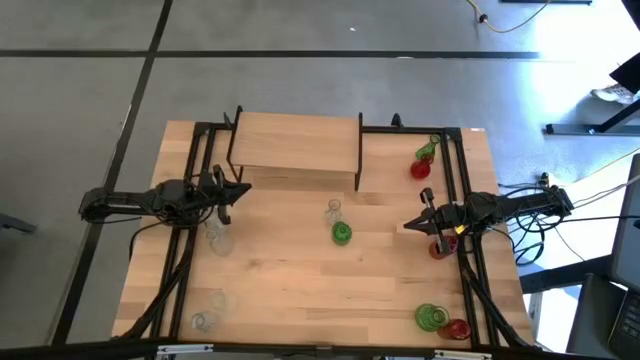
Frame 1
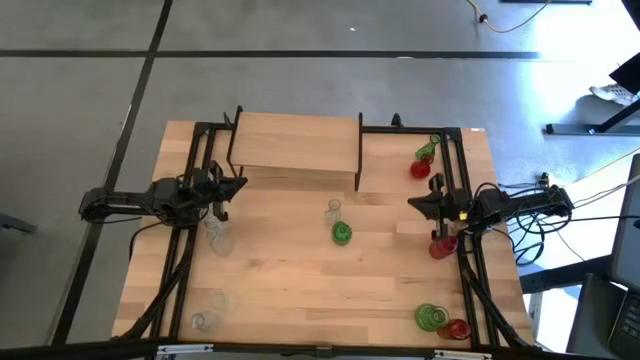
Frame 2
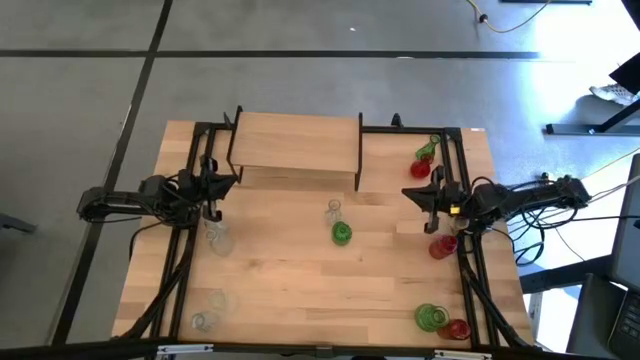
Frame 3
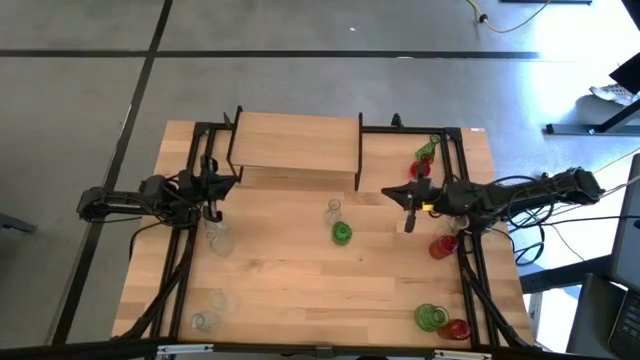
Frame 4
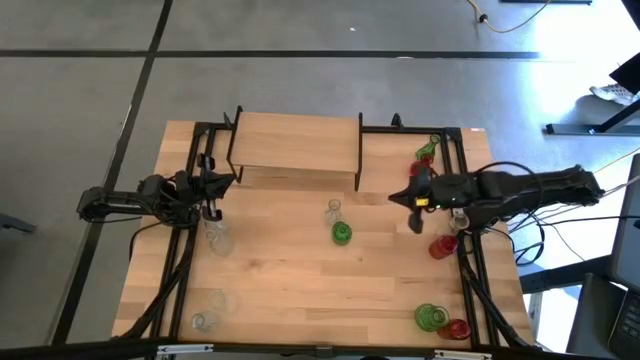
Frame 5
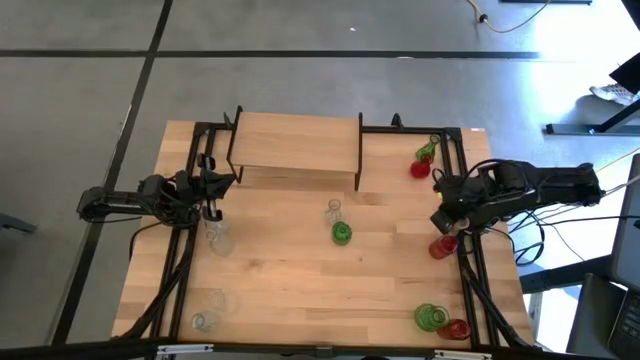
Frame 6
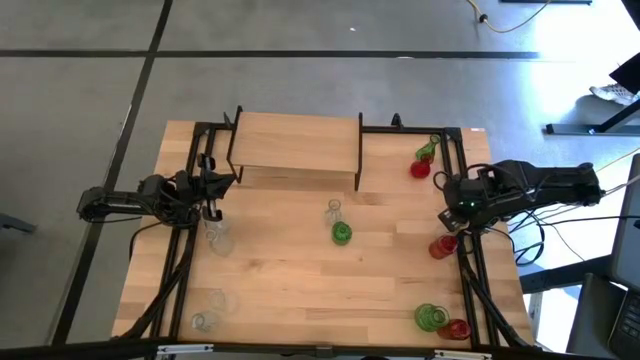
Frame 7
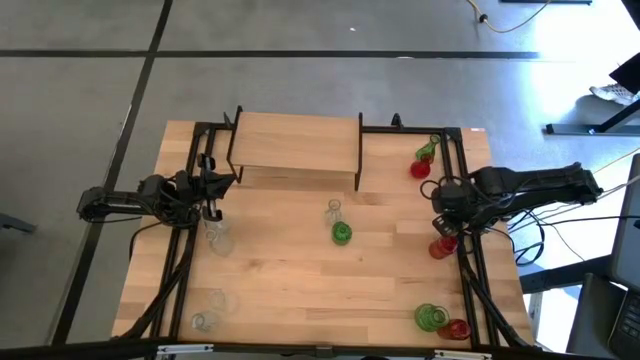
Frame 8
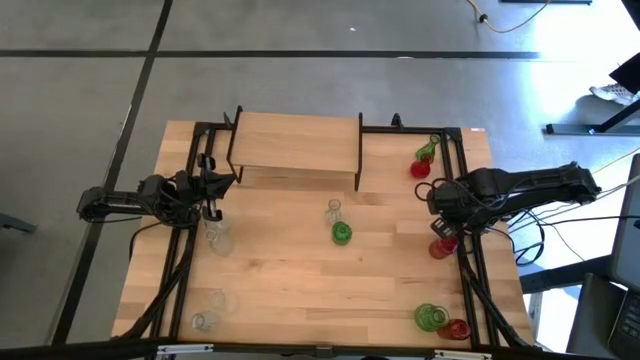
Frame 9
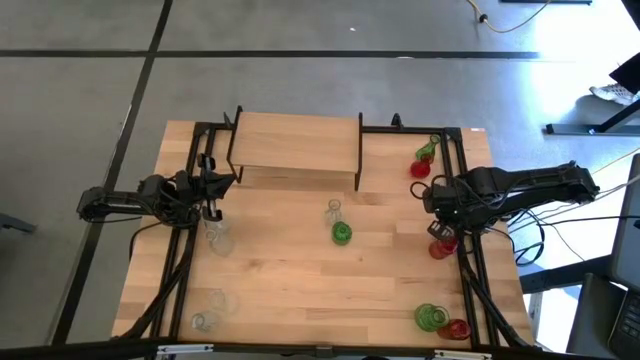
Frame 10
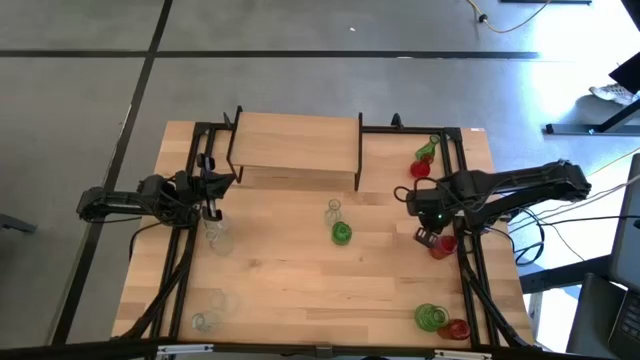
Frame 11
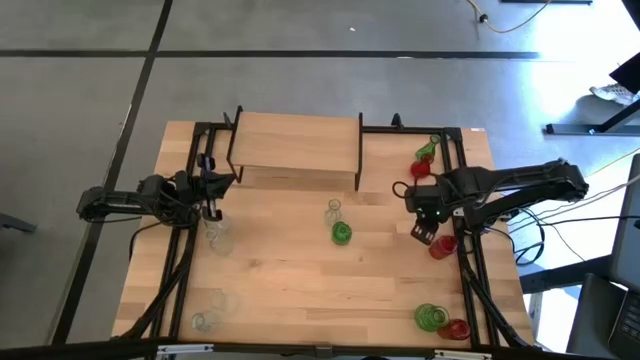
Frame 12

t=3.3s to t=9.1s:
Task: sort vases onto shelf
Adjust the transparent vase

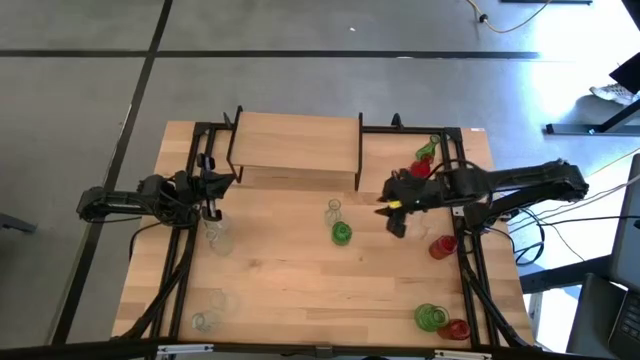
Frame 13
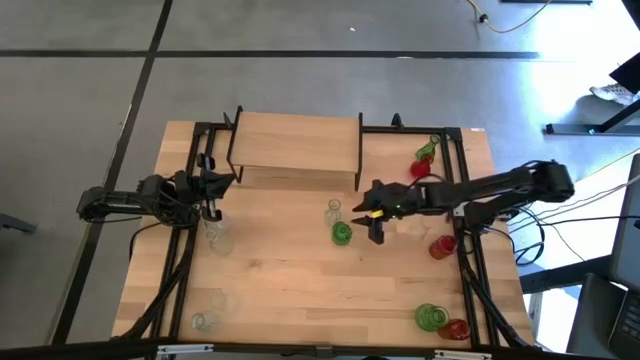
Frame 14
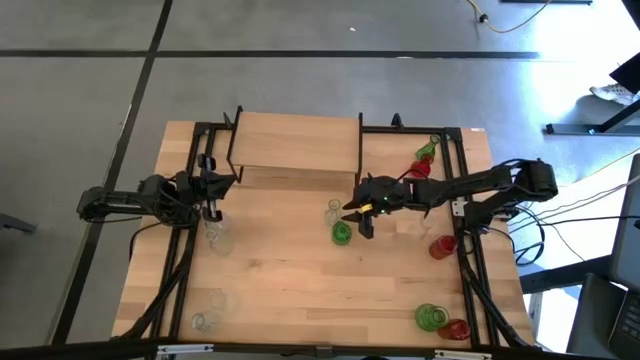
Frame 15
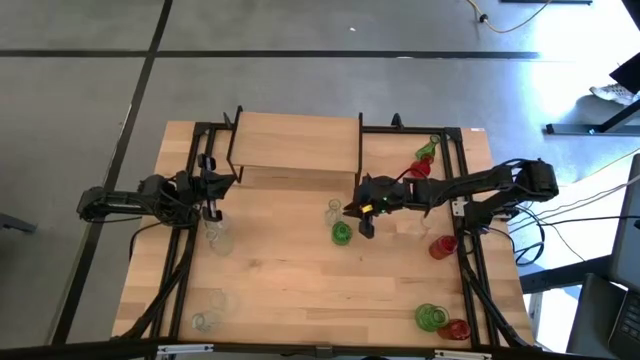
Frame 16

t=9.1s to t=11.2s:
Put the transparent vase on the shelf

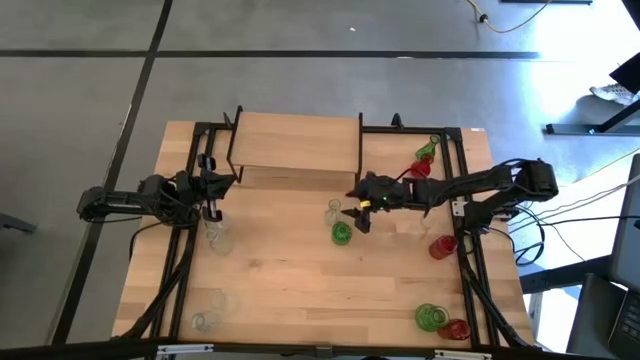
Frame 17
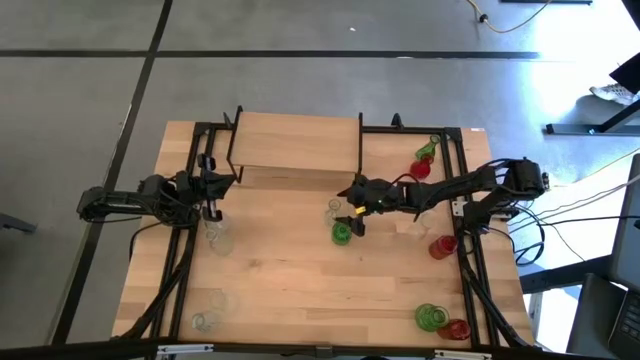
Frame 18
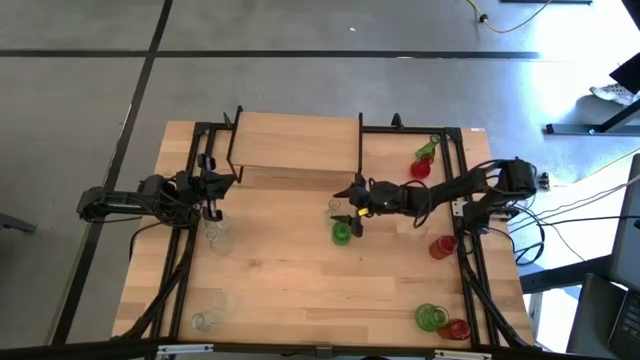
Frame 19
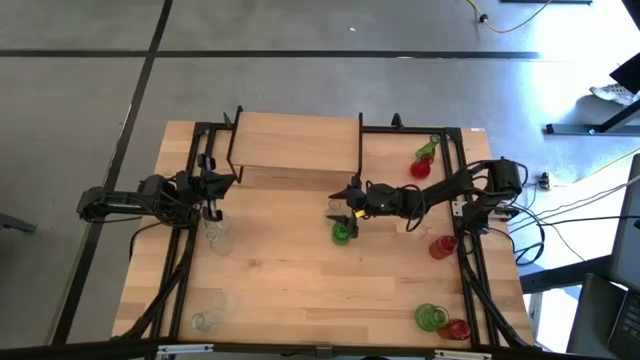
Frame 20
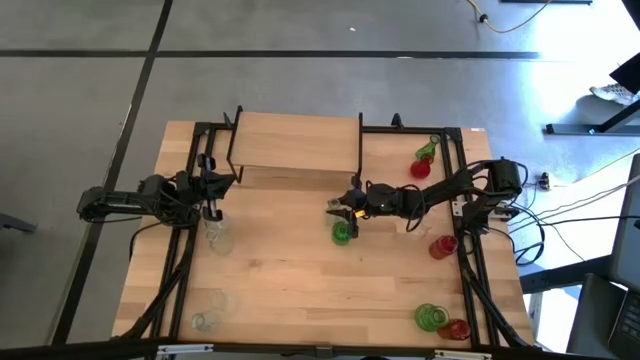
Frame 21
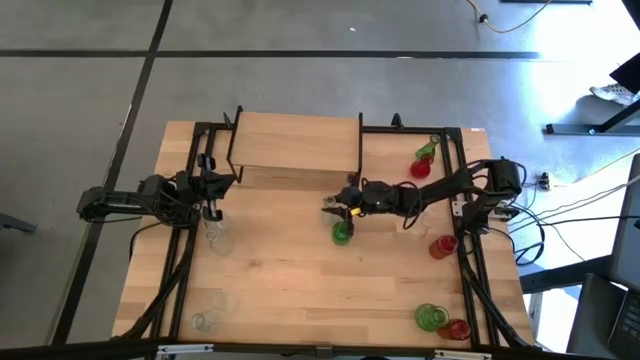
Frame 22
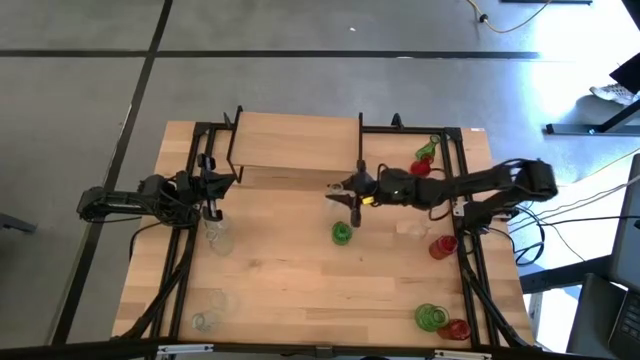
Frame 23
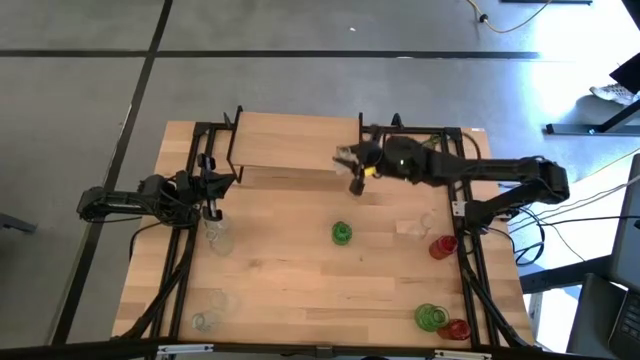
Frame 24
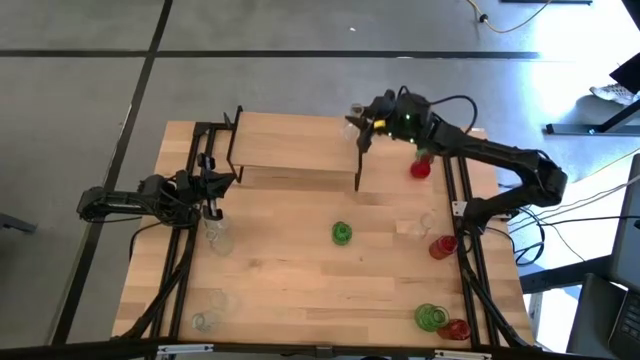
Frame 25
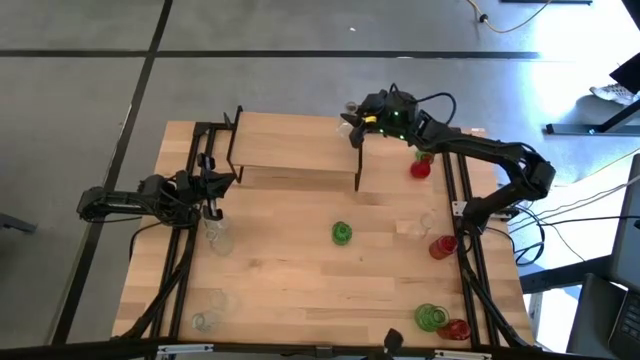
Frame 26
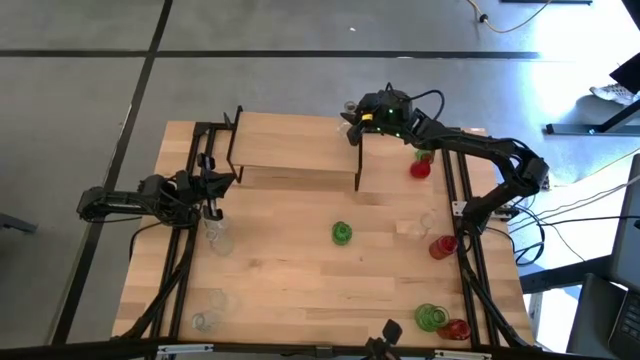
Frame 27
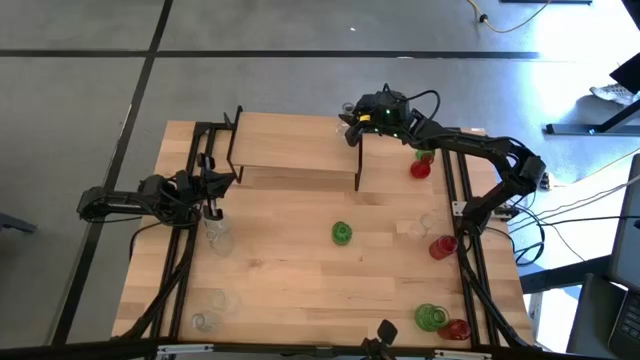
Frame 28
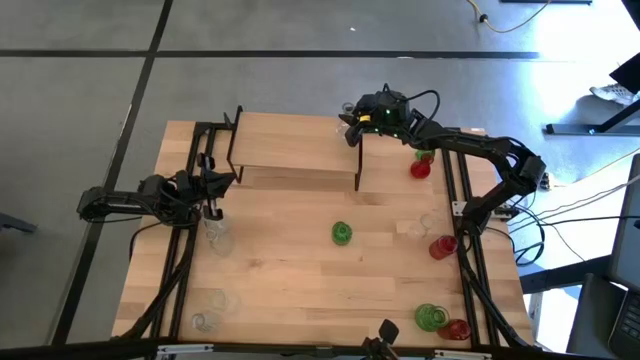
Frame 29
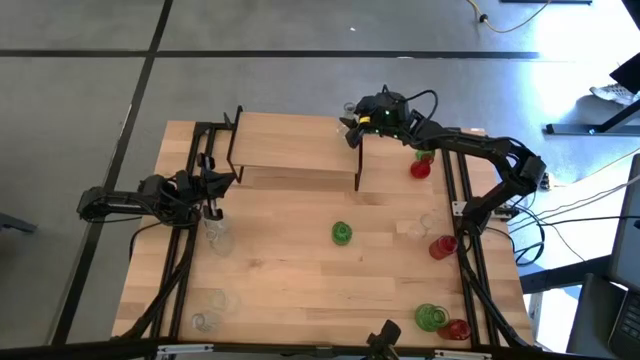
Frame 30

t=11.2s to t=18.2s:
Put the transparent vase on the shelf

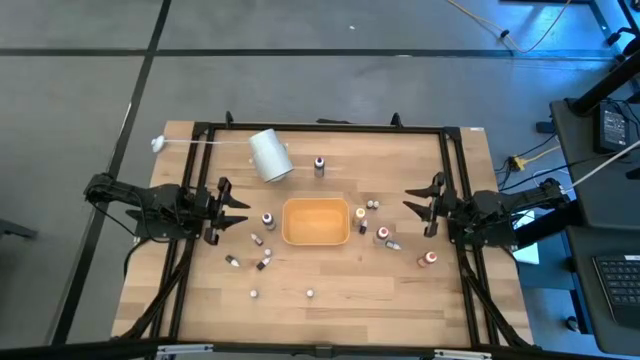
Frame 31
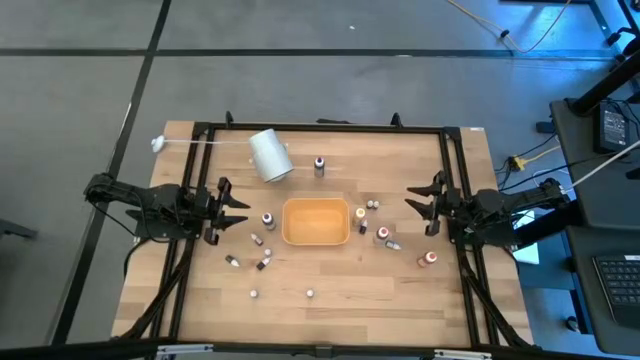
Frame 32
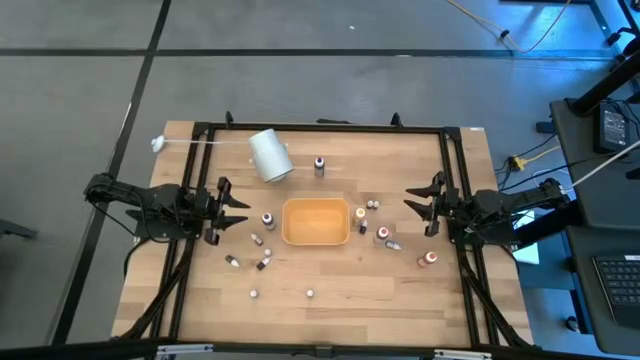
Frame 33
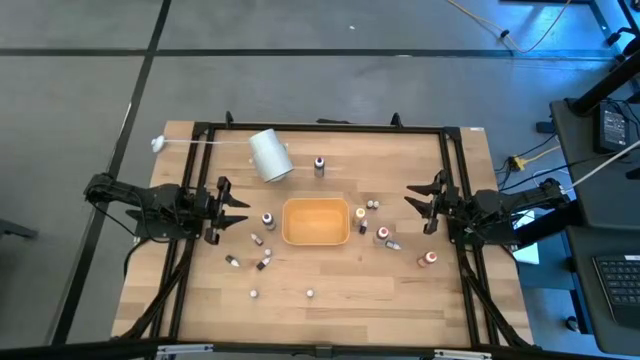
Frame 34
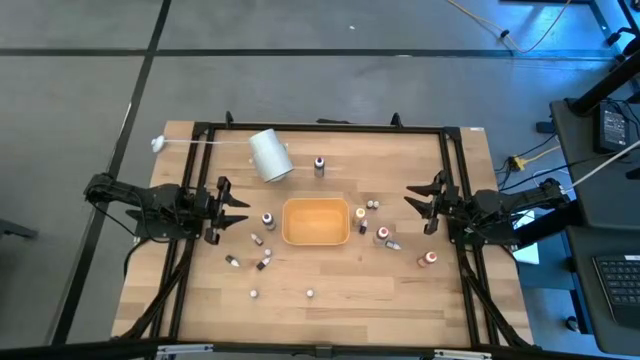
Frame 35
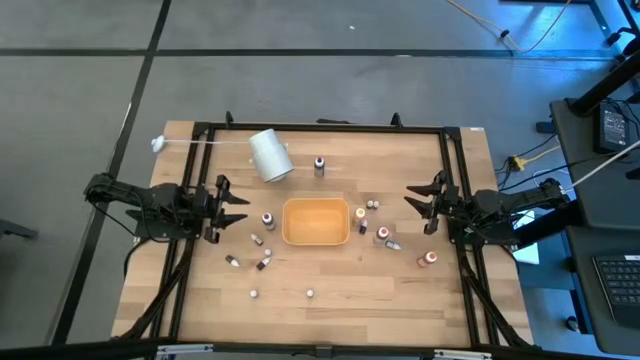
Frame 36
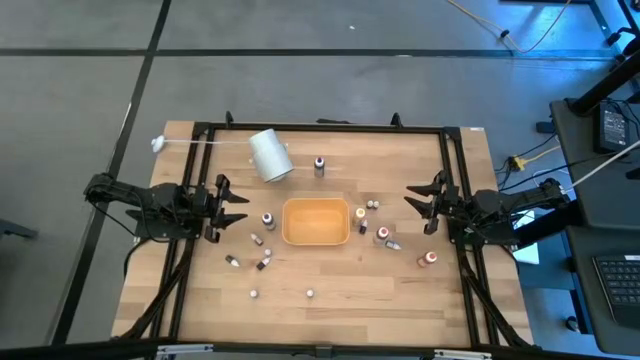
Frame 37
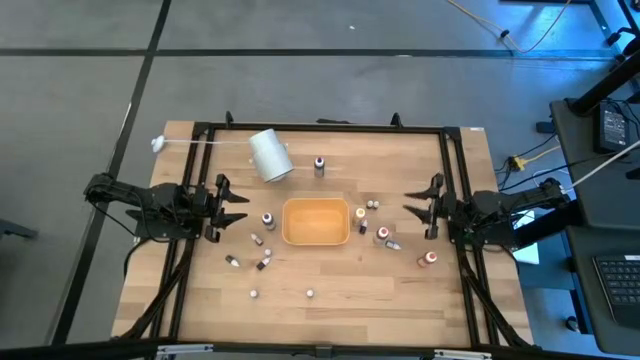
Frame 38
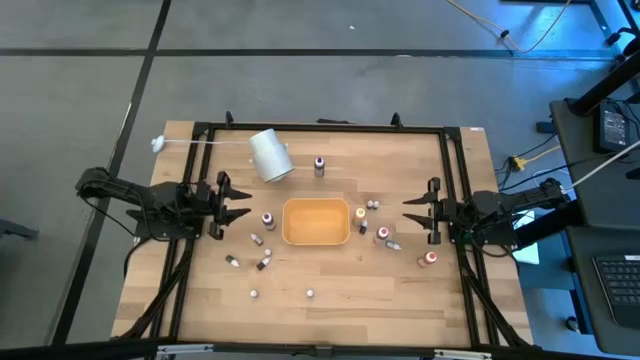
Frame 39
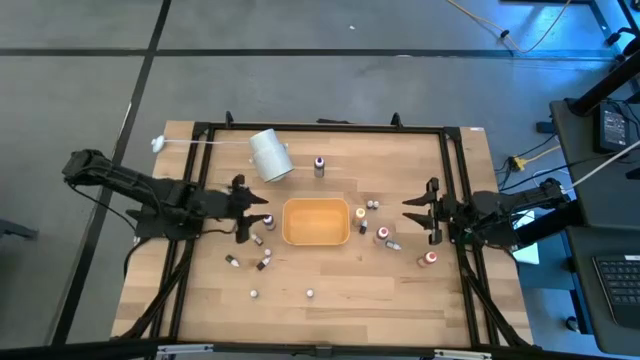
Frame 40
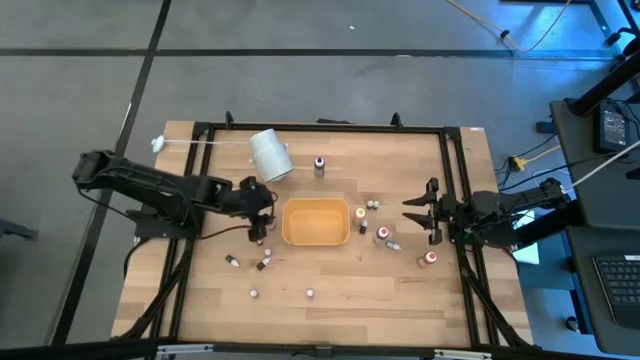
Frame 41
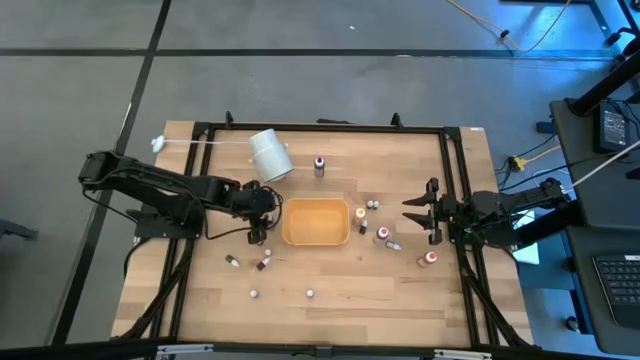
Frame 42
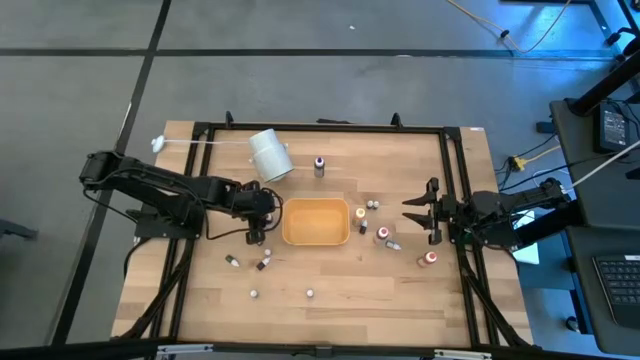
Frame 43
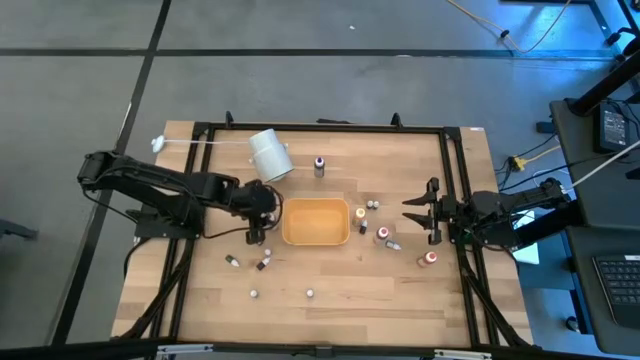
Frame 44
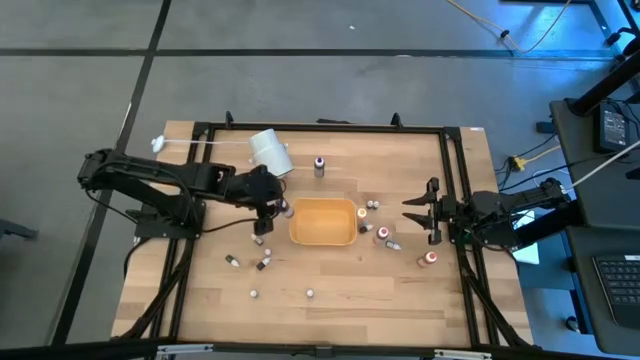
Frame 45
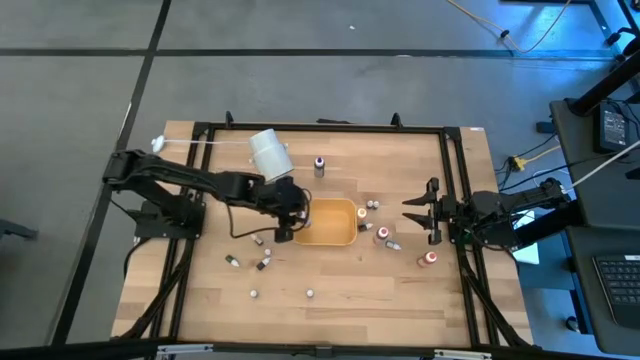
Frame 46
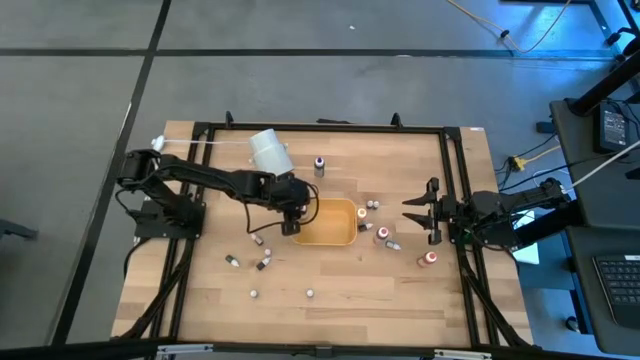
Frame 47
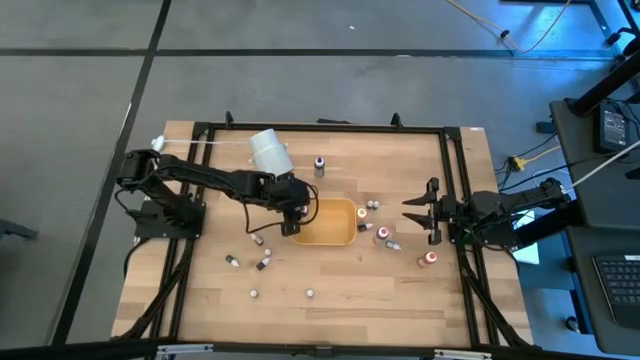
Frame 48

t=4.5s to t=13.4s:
Task: Pick & Place food coloring
Put the large violet ink bottle into the yellow bin
